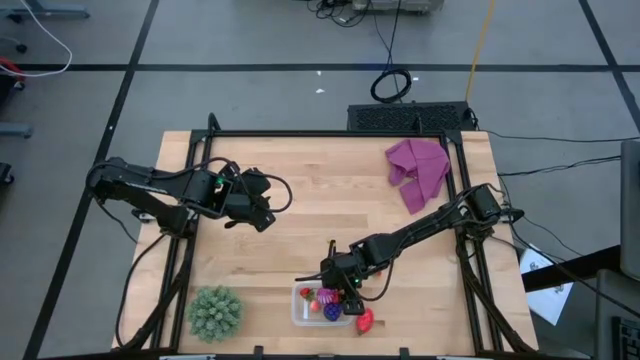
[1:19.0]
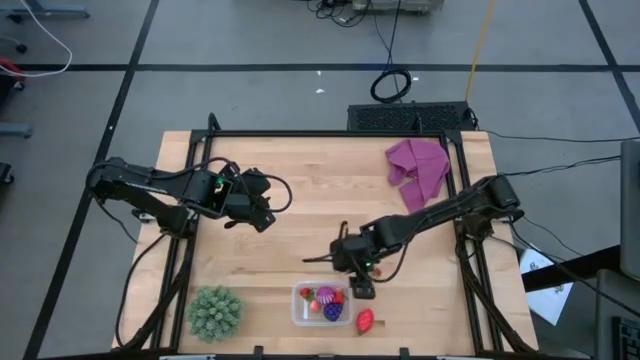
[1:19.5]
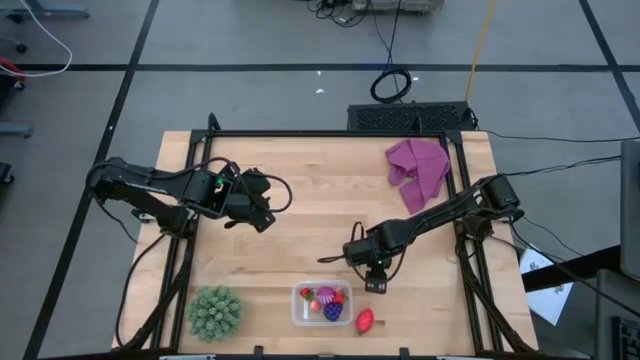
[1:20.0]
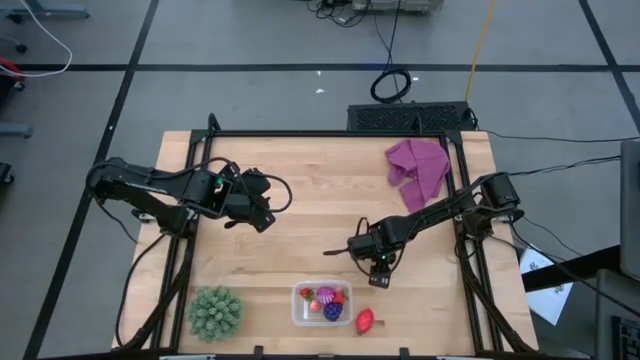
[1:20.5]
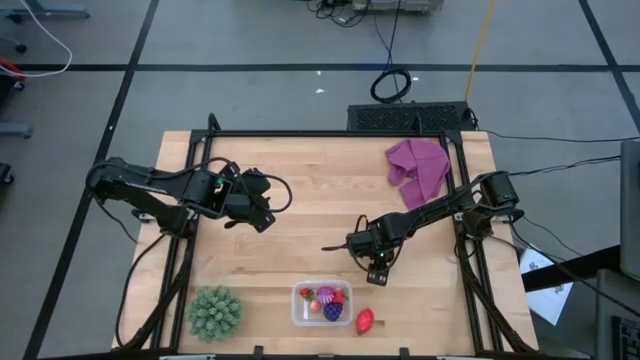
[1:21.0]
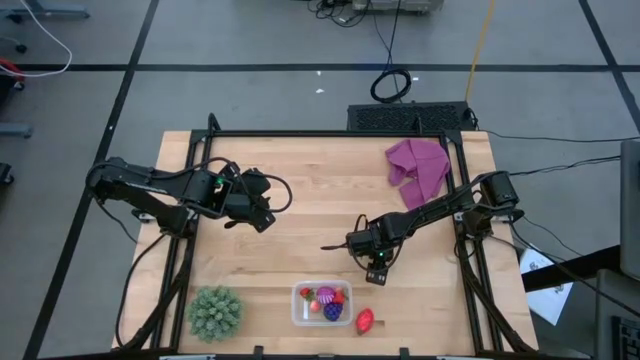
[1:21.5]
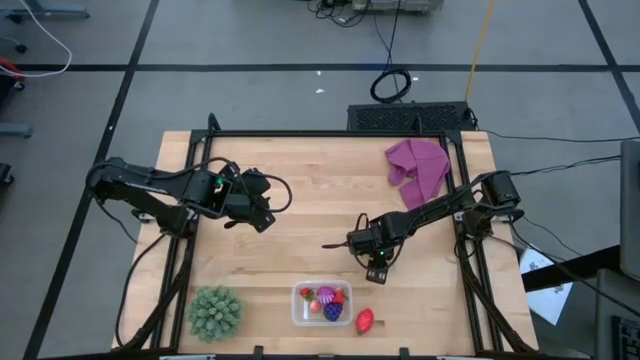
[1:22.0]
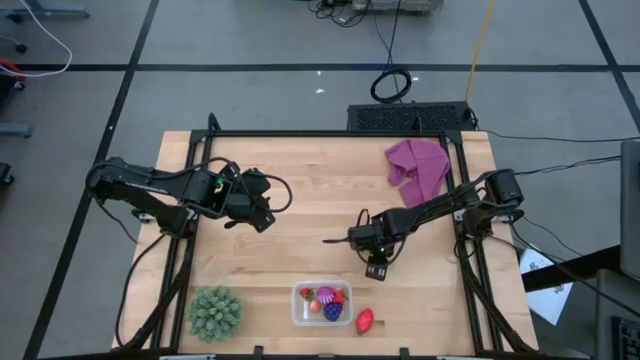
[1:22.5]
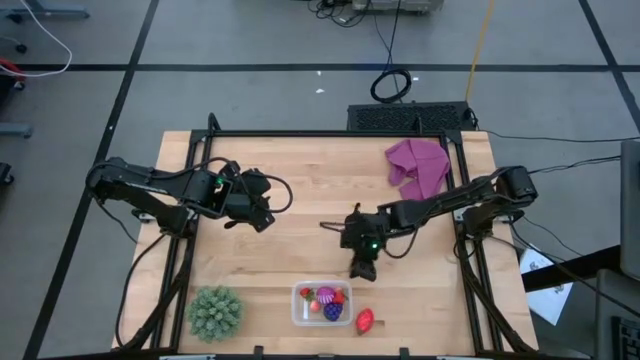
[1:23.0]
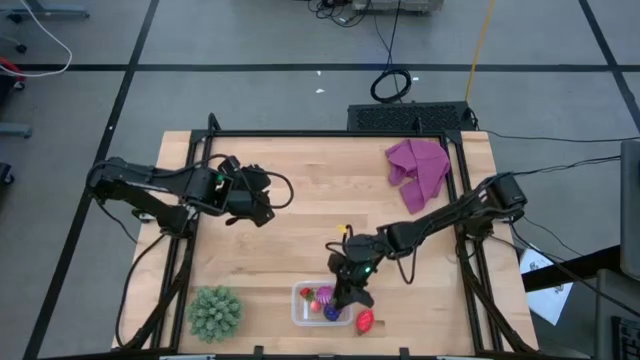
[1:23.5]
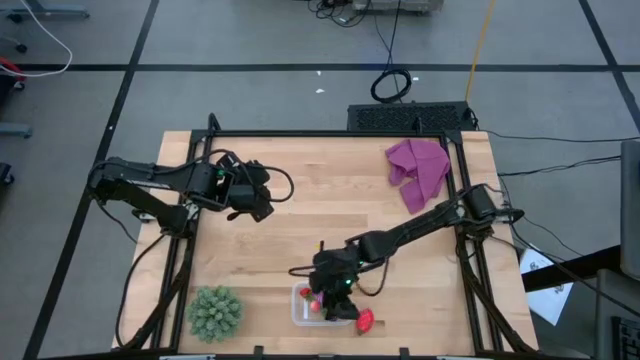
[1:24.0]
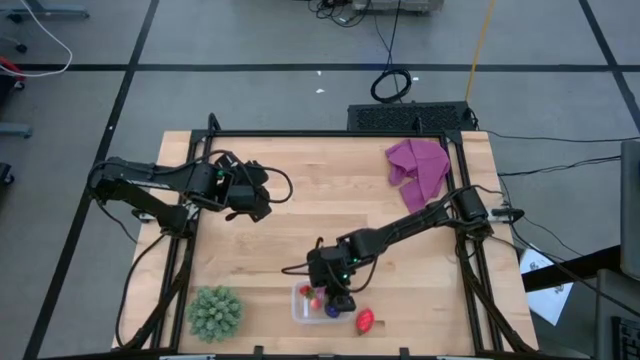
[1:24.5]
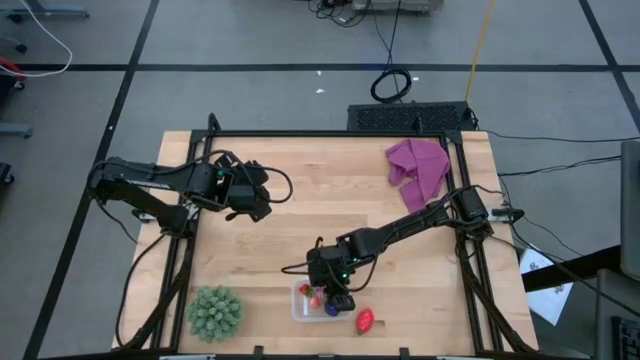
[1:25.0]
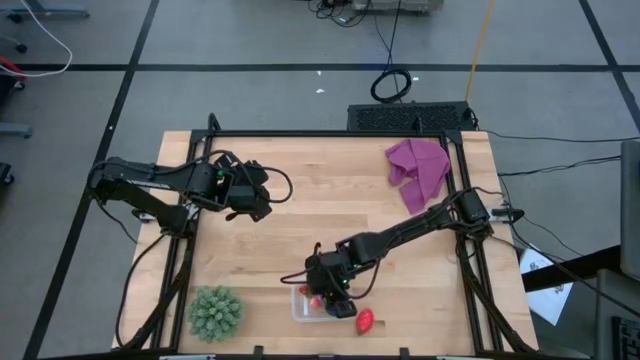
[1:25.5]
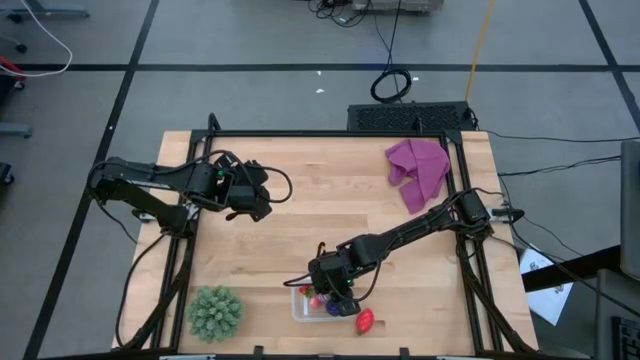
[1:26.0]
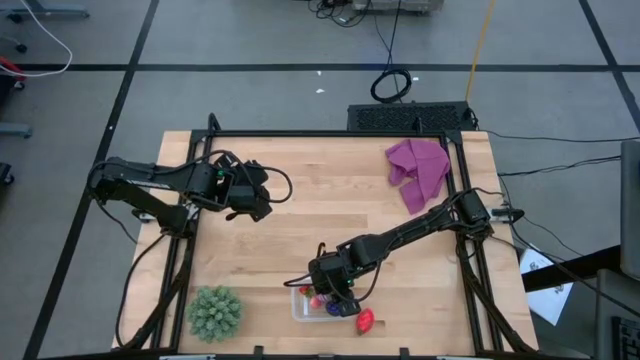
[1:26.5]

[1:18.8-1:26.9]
Task: Pick and placing Produce into tupperware
Put the strawberry into the transparent bin

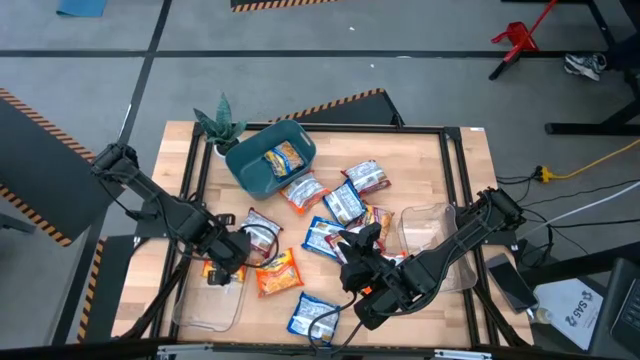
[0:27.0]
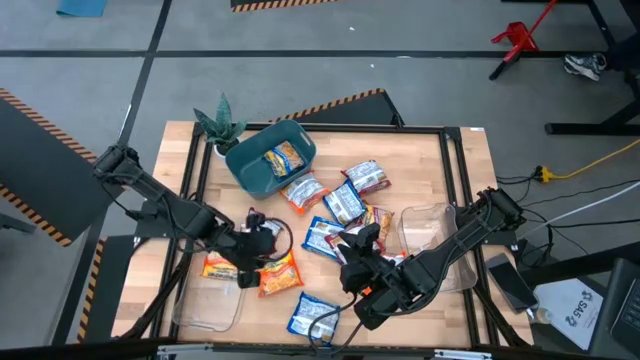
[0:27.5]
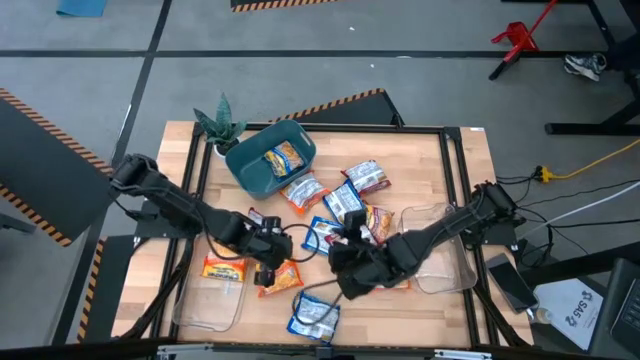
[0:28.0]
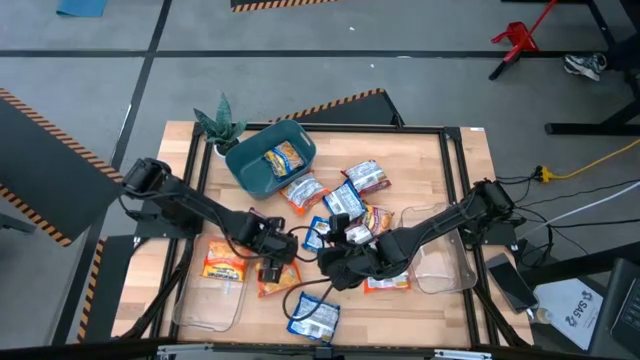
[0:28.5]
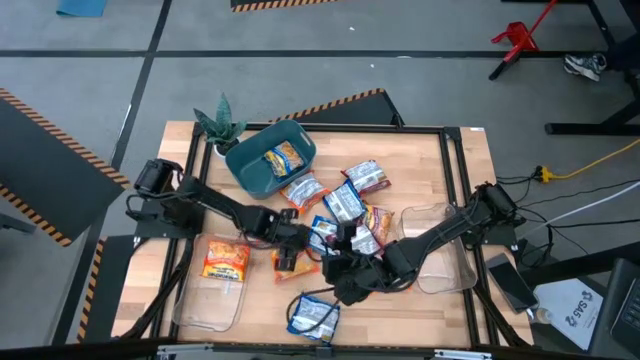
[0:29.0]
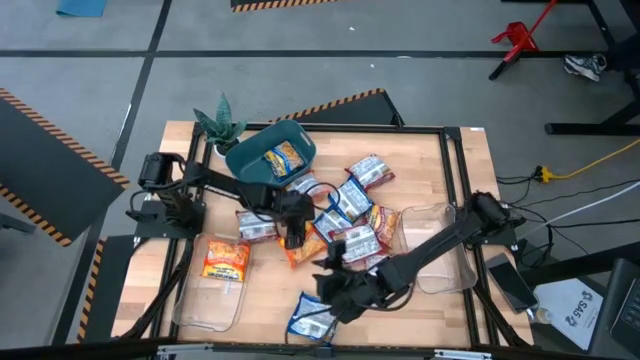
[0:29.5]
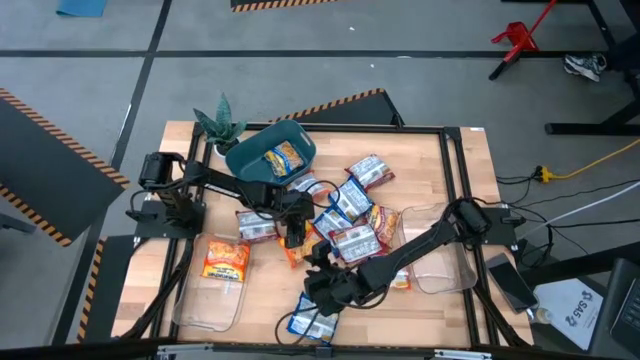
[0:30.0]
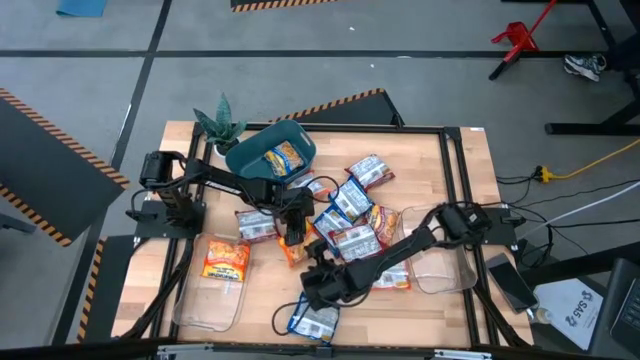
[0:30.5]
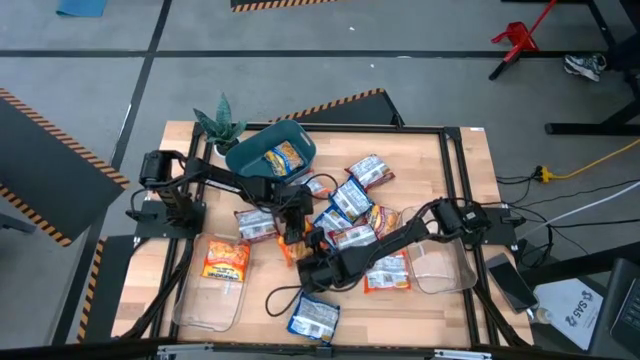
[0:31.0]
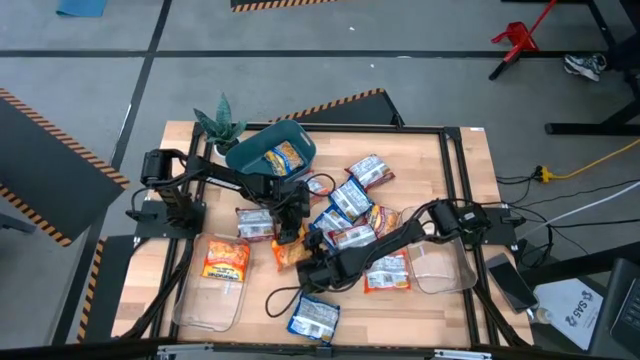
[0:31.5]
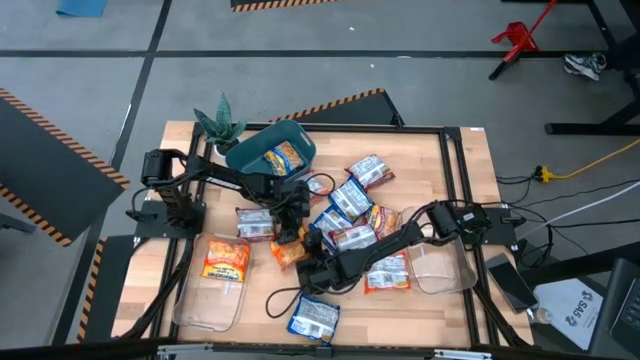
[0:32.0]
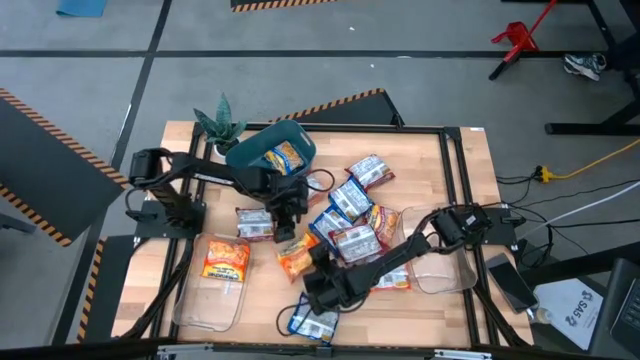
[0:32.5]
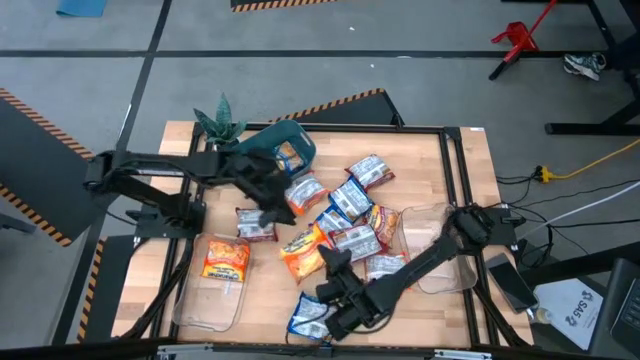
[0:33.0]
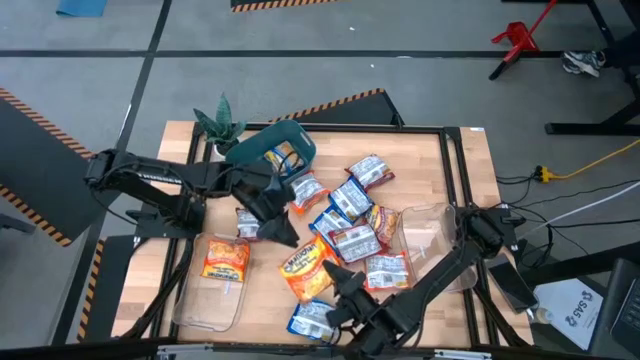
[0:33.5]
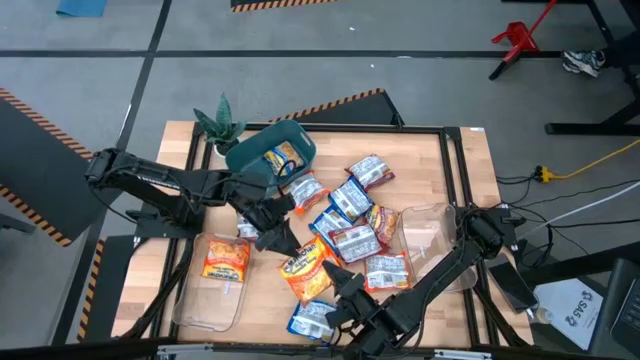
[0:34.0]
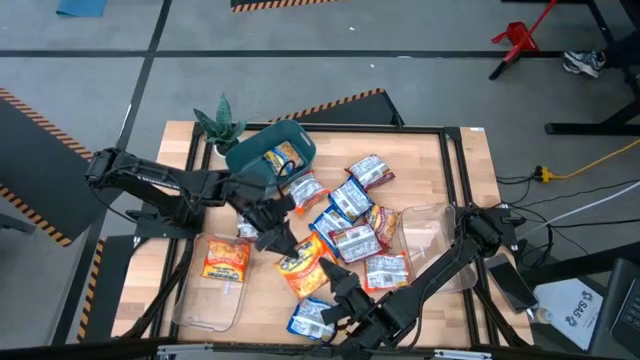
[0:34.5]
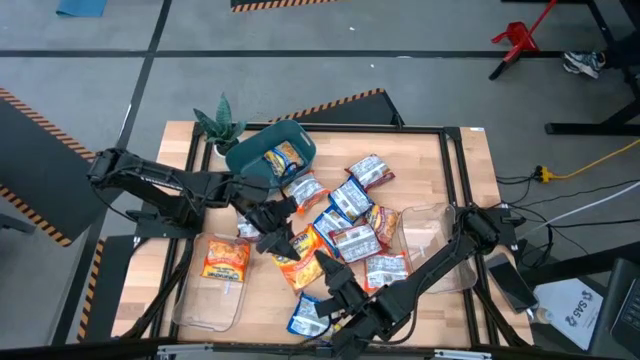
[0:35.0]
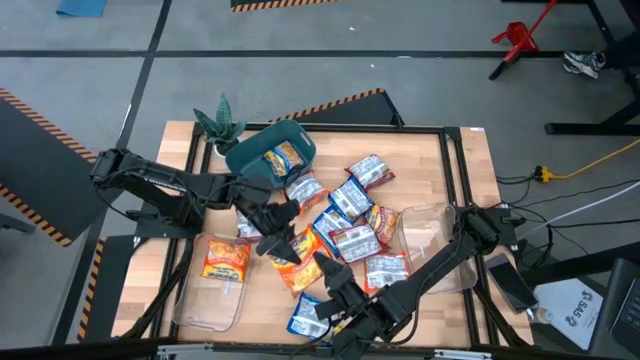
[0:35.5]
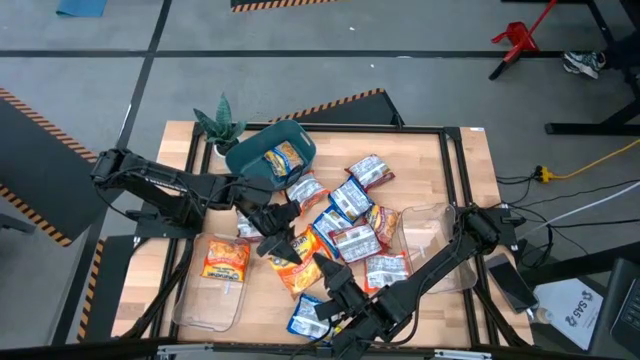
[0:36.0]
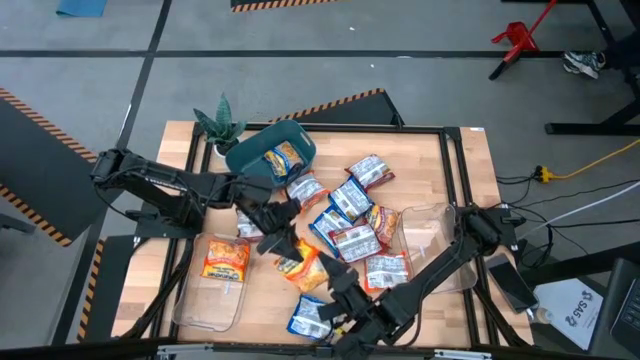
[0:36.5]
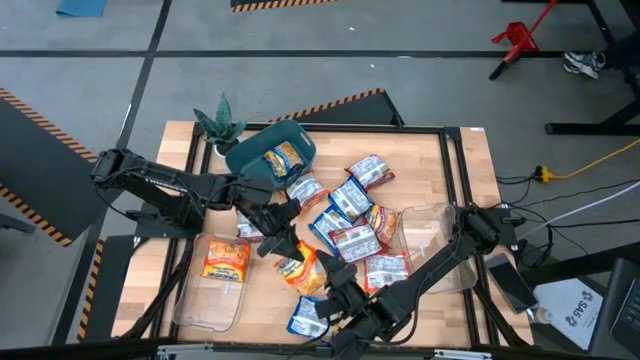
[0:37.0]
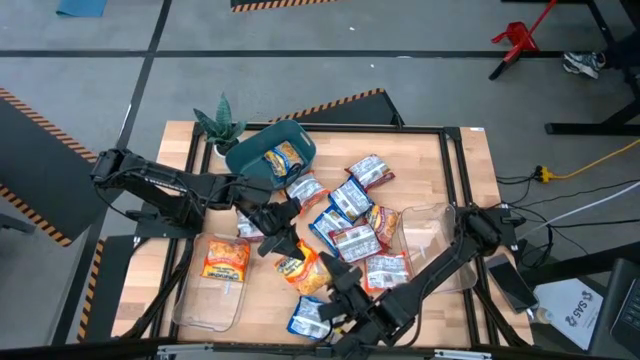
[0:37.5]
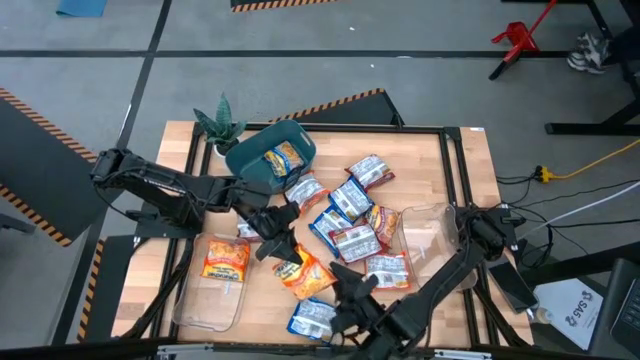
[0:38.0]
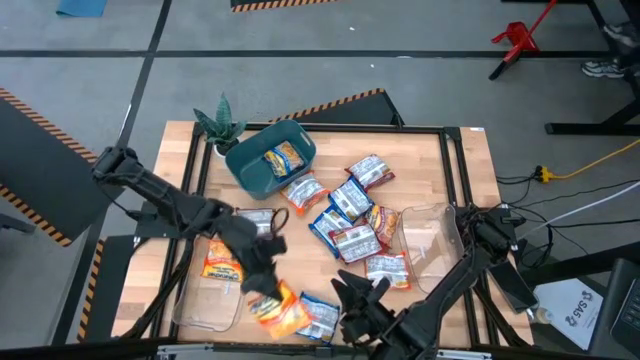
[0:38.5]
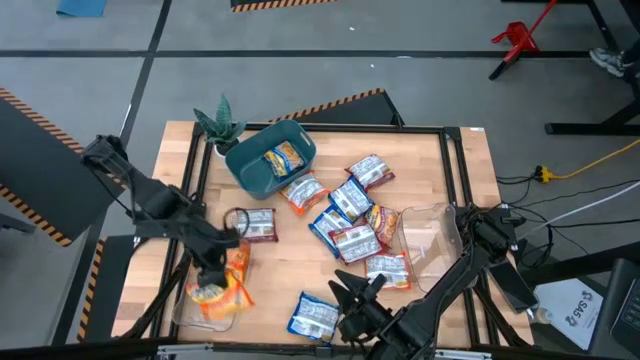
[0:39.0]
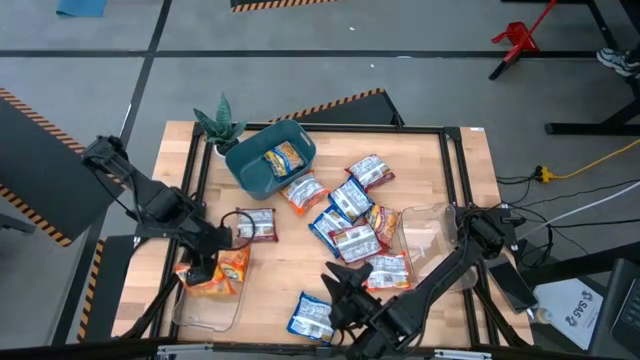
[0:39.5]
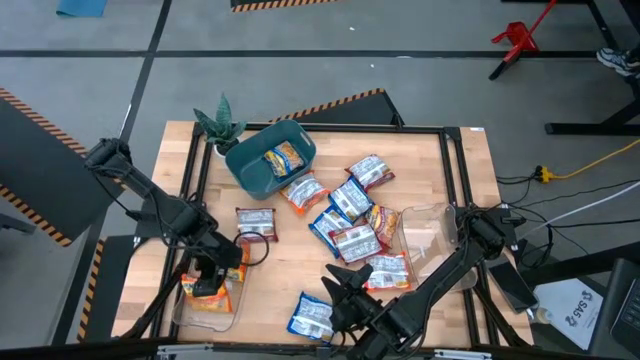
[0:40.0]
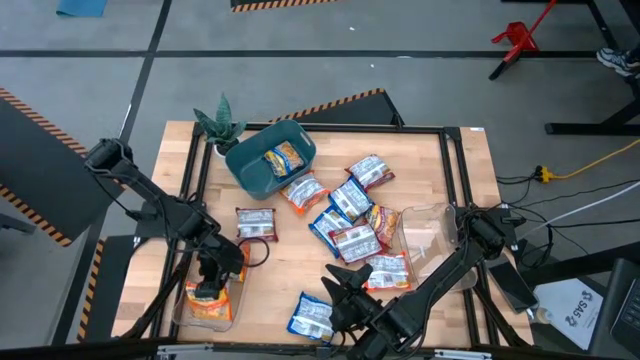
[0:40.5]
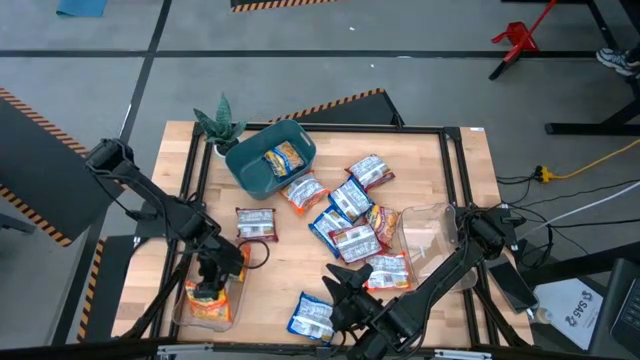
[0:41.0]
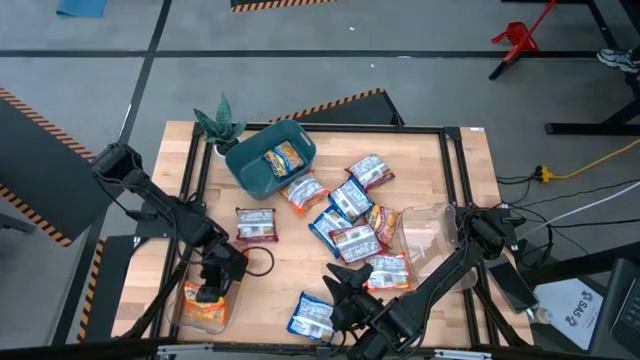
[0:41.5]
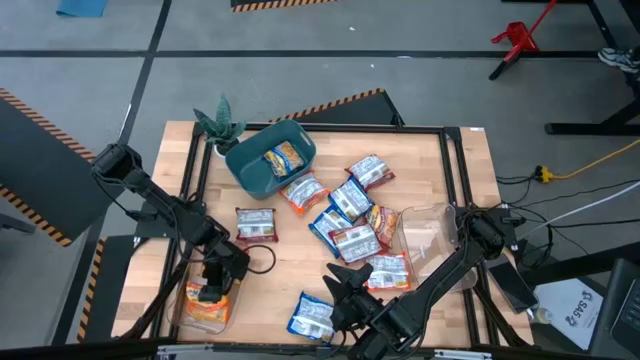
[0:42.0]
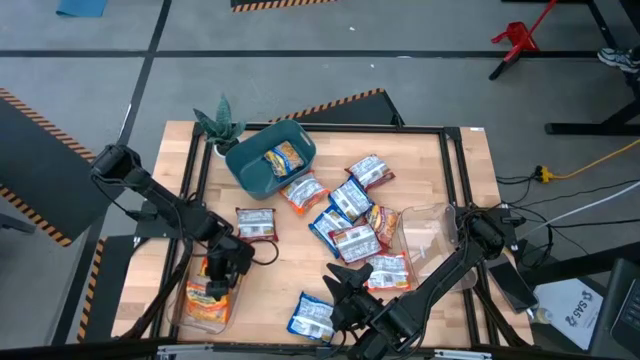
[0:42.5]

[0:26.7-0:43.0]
Task: Sort Maruchan noodles
Put the orange noodle pack into the left transparent bin
